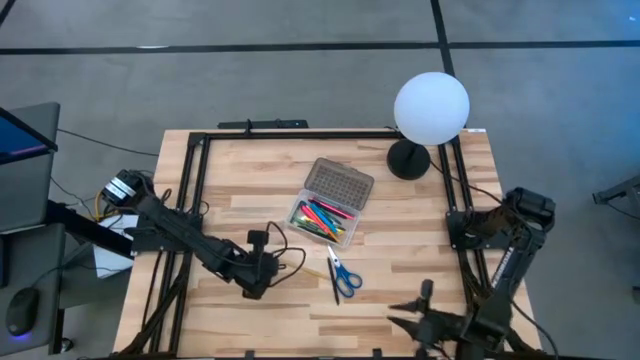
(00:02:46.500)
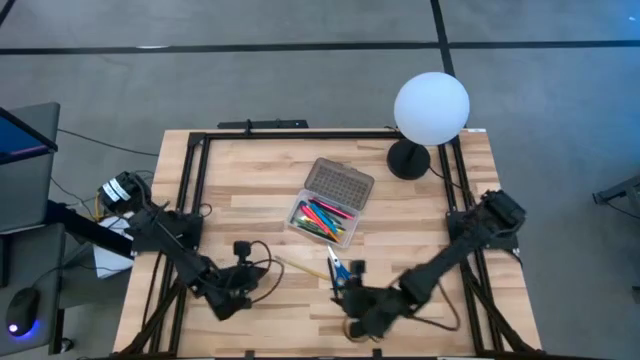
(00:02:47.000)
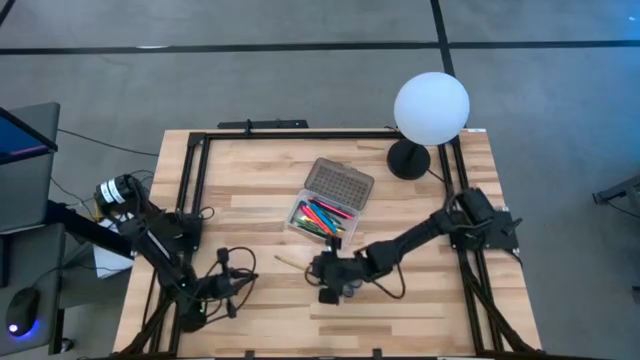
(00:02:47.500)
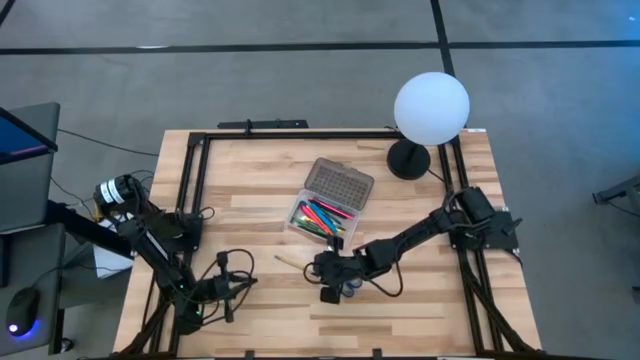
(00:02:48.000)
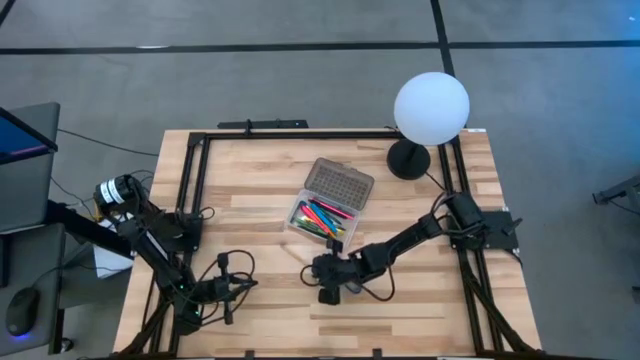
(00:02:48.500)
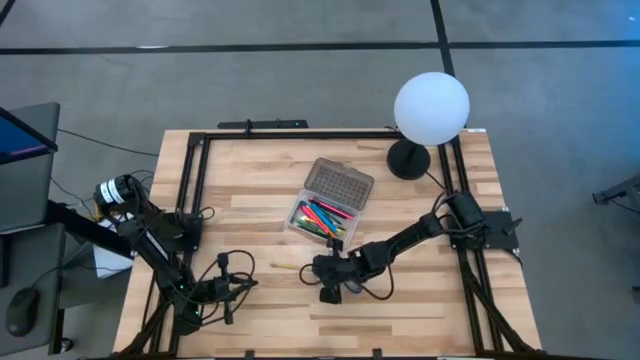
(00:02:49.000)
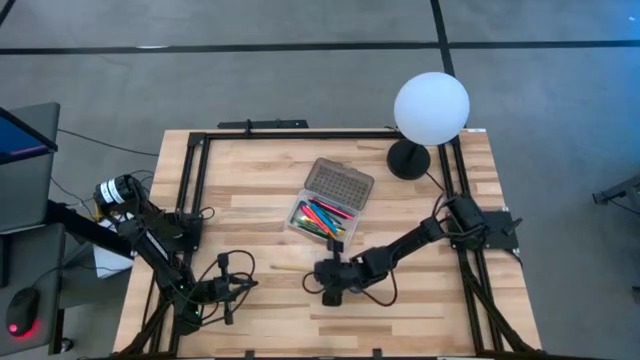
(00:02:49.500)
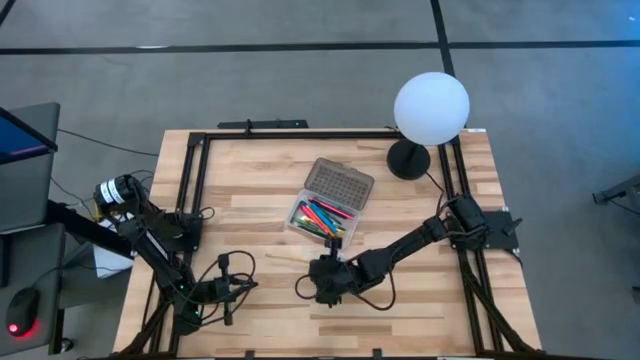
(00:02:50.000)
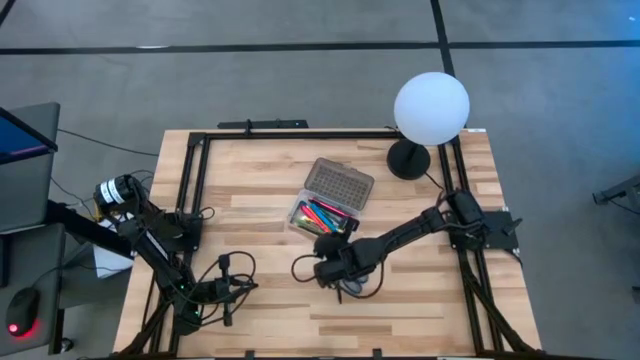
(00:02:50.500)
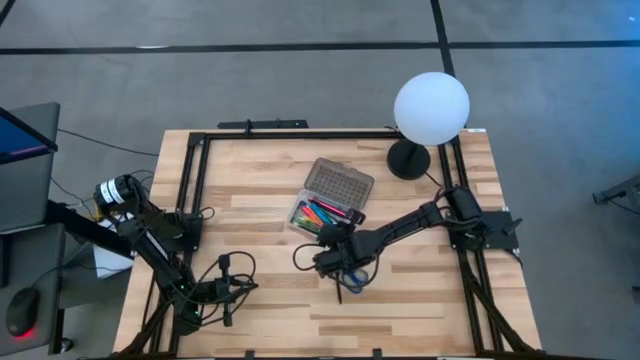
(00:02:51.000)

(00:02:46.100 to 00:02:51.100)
Task: Pick & place school supplies into a supply box
Put the orange pencil into the gray supply box

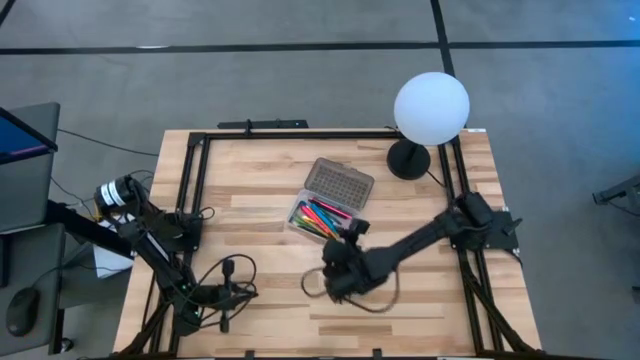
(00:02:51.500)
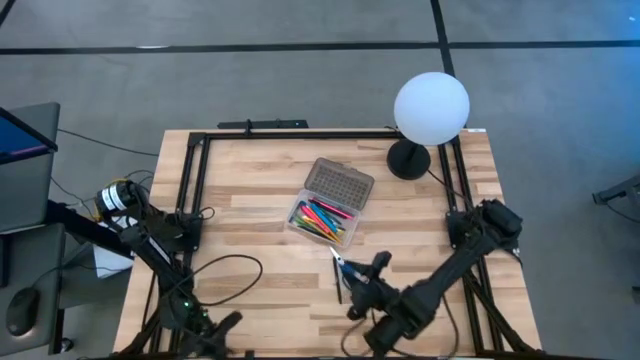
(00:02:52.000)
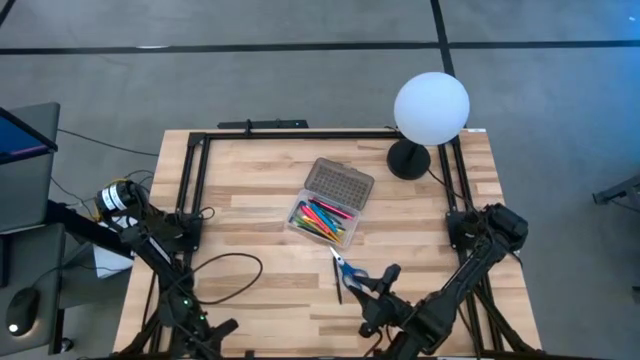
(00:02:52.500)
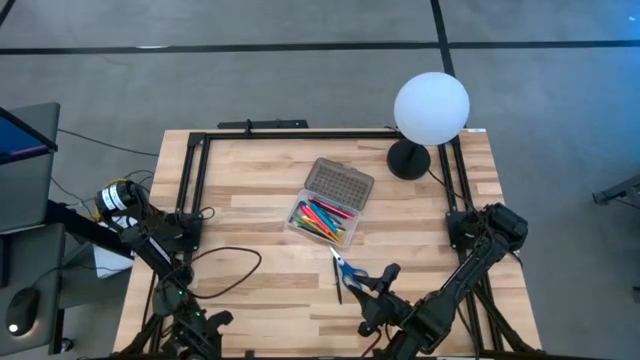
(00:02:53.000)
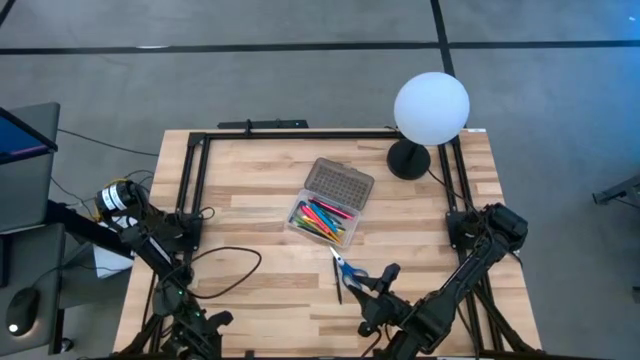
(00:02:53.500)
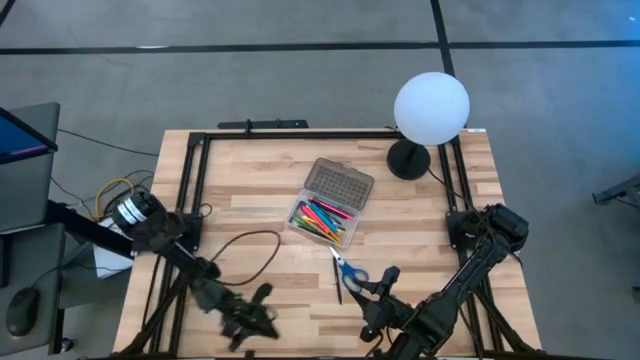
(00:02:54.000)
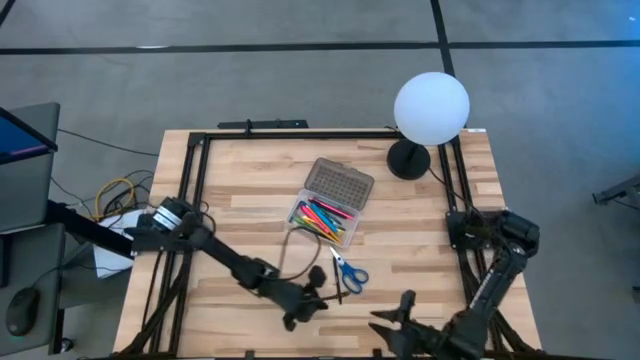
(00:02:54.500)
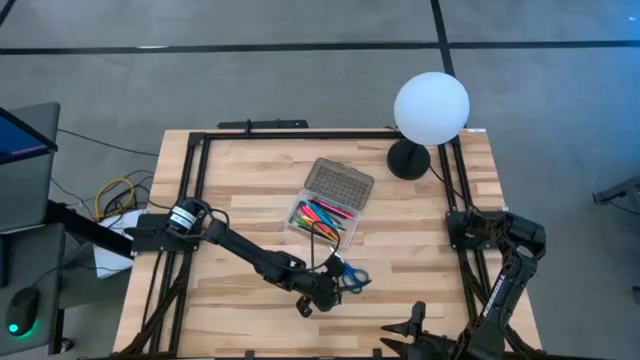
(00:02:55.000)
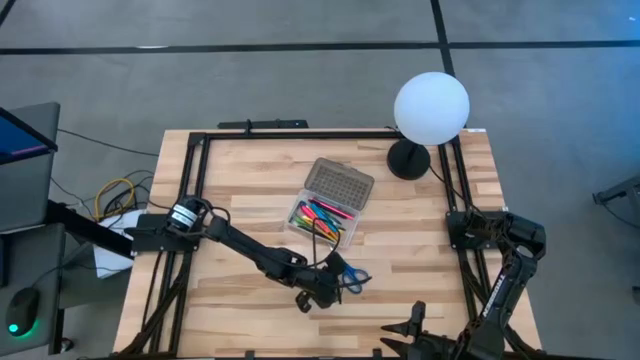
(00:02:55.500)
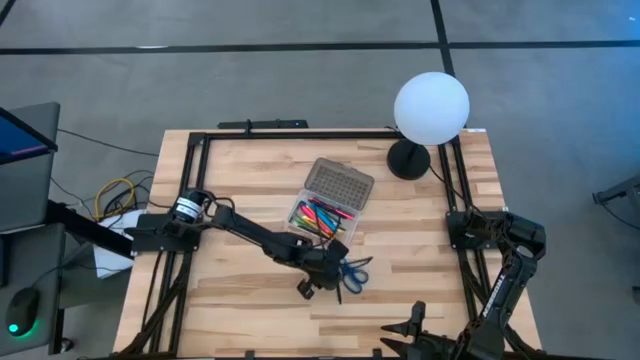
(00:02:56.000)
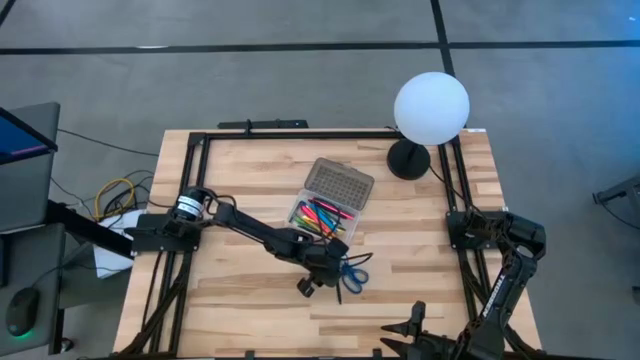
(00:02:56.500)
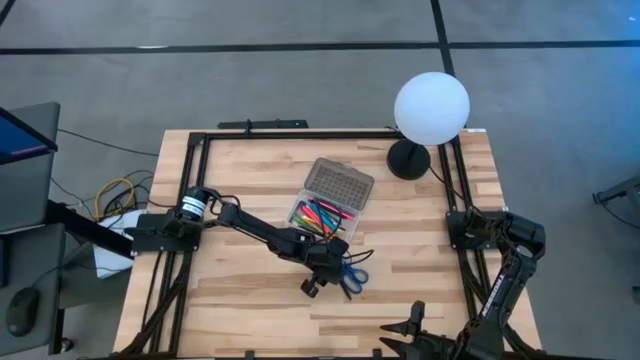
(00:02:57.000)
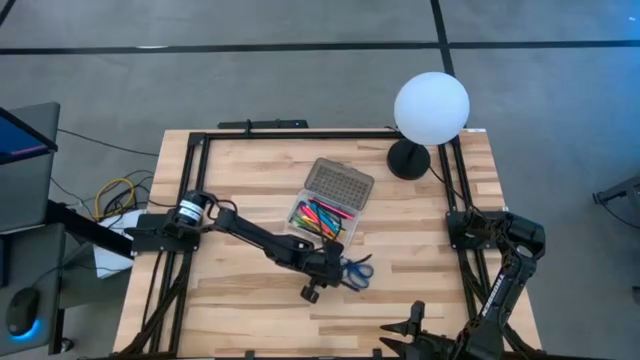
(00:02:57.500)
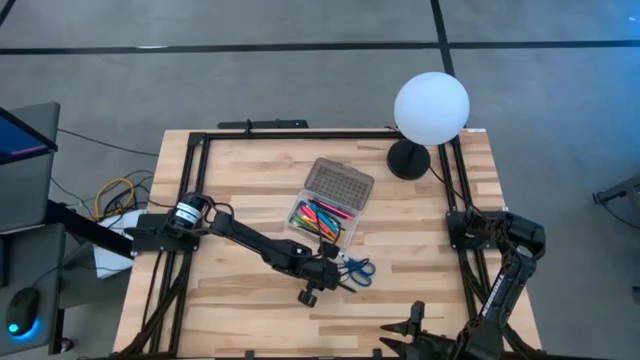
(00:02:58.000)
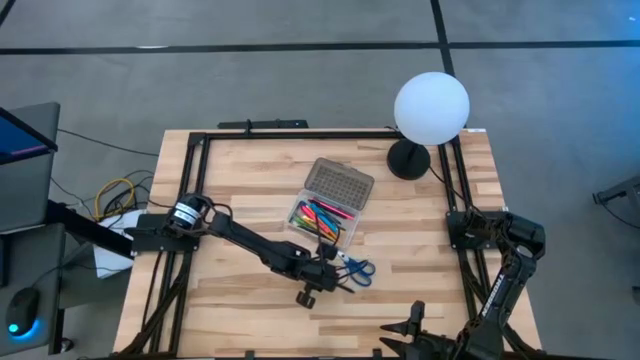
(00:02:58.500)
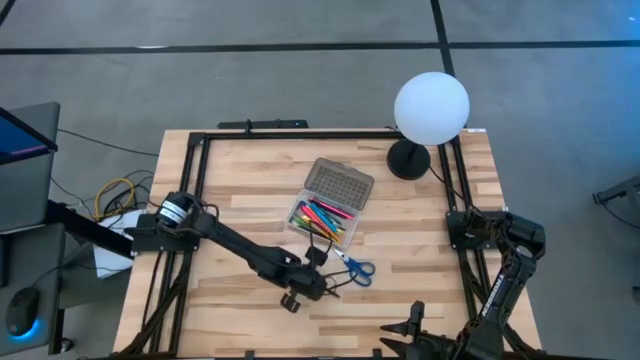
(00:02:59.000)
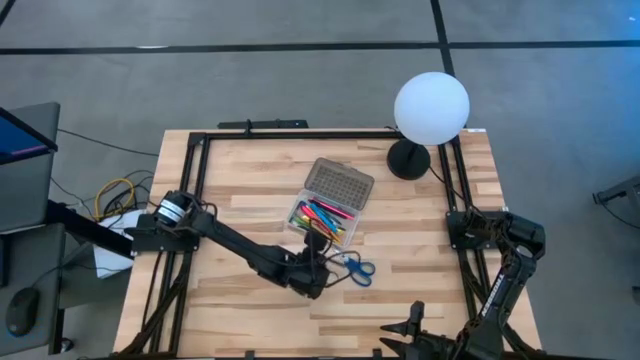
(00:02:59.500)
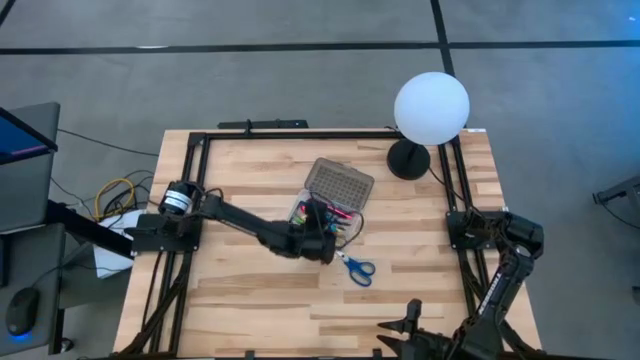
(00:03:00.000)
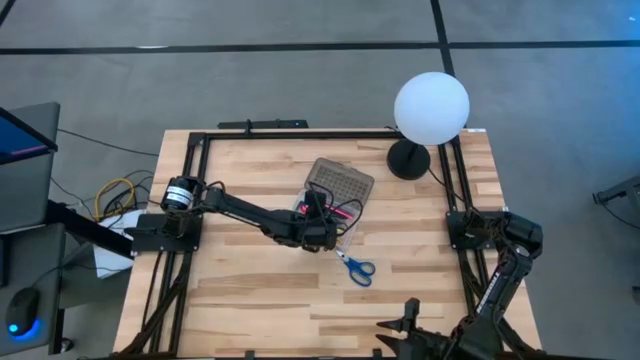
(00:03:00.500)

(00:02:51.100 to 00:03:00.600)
Put the black pen into the gray supply box

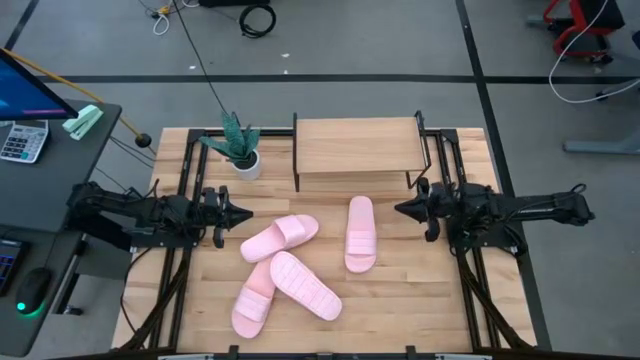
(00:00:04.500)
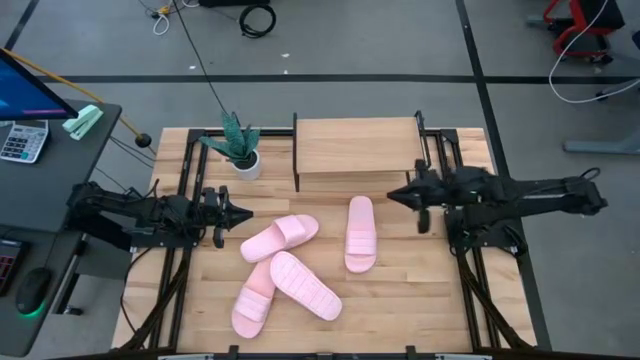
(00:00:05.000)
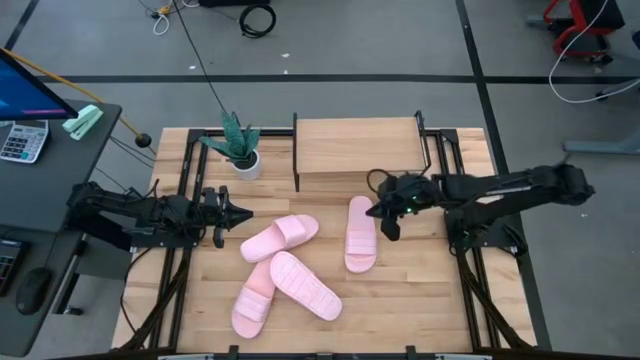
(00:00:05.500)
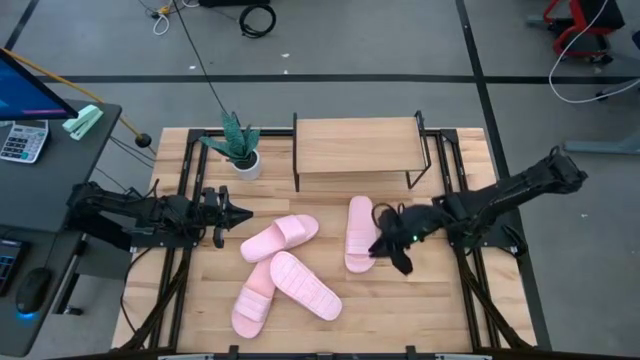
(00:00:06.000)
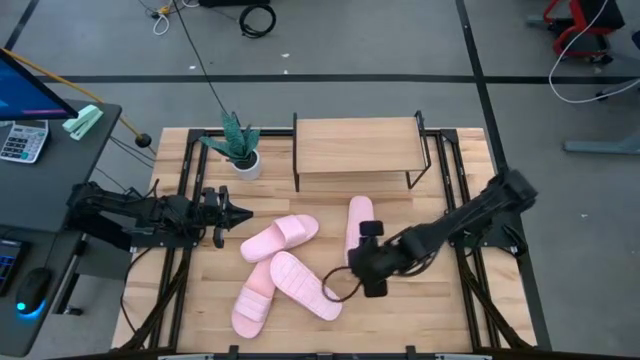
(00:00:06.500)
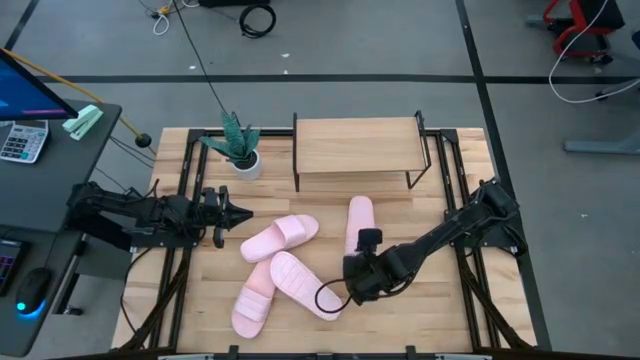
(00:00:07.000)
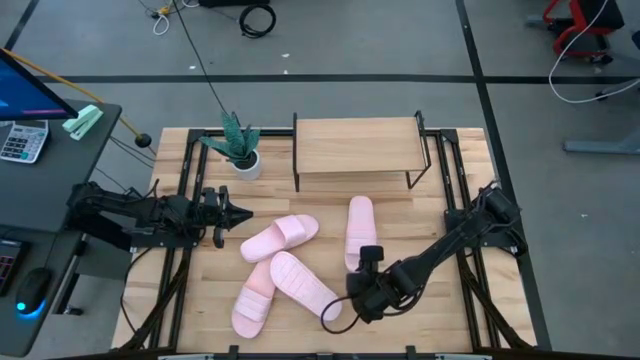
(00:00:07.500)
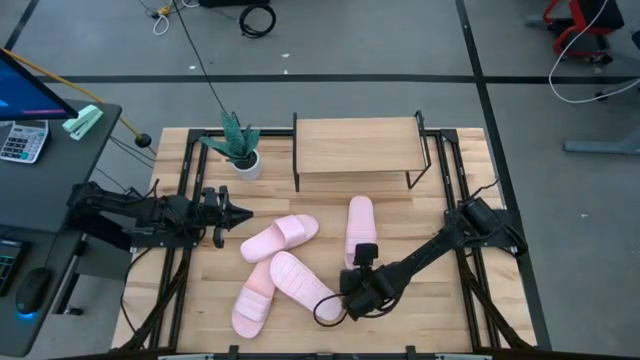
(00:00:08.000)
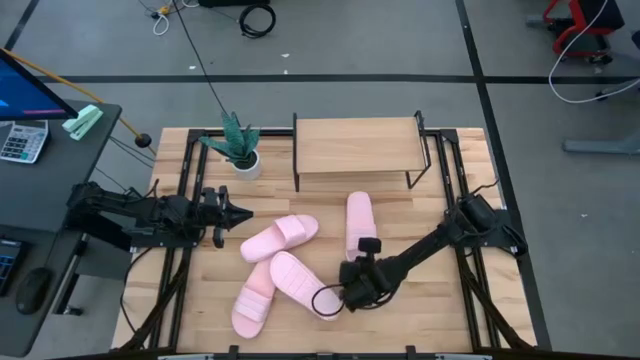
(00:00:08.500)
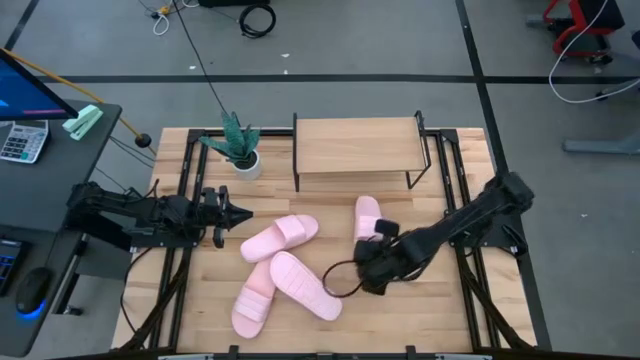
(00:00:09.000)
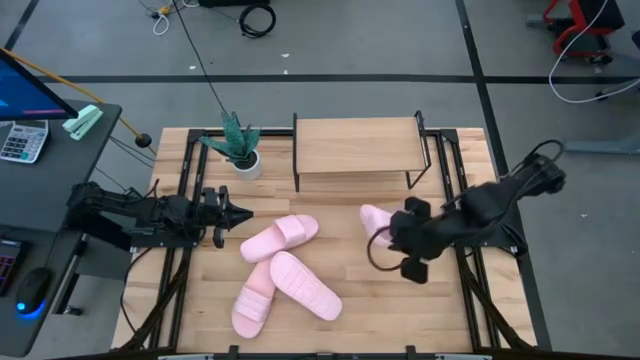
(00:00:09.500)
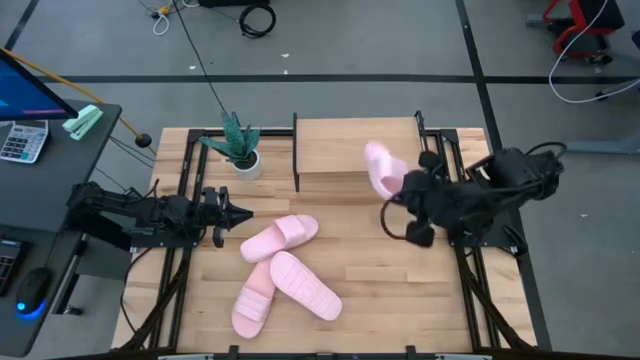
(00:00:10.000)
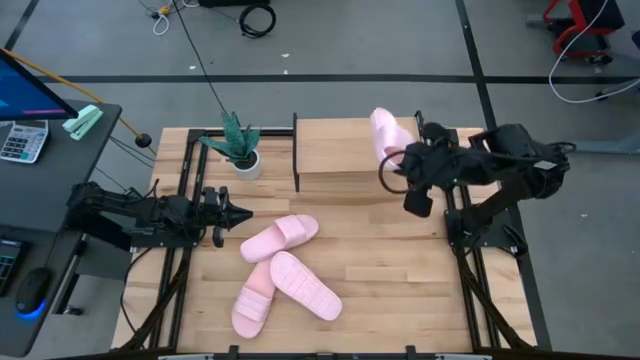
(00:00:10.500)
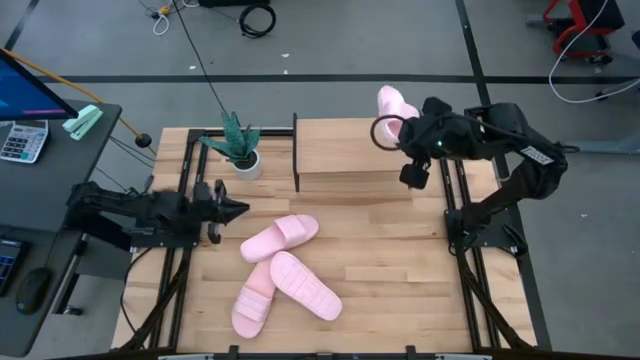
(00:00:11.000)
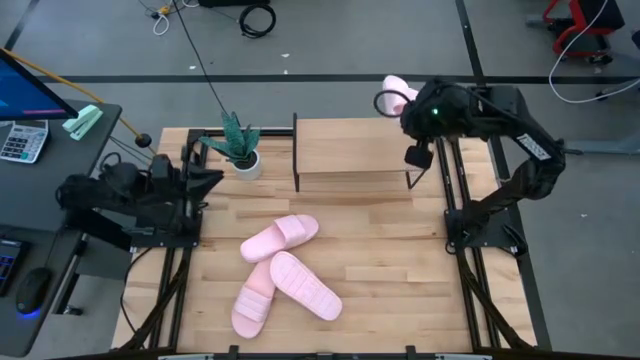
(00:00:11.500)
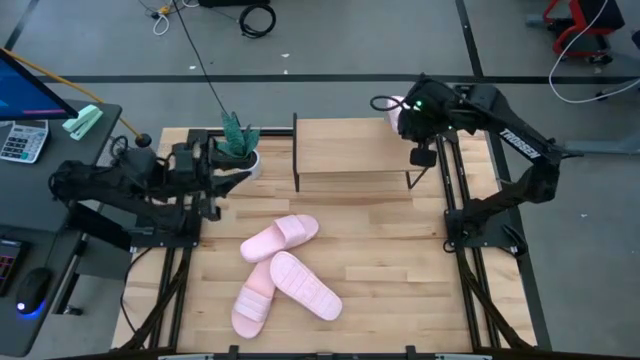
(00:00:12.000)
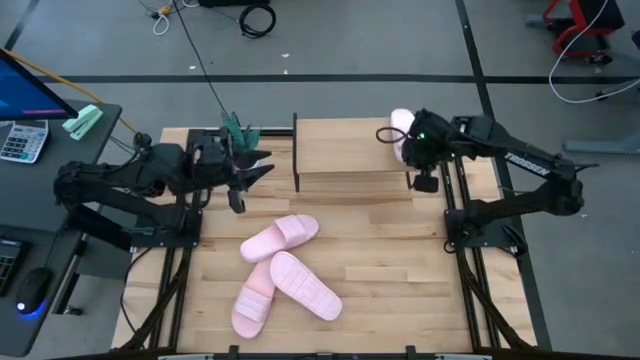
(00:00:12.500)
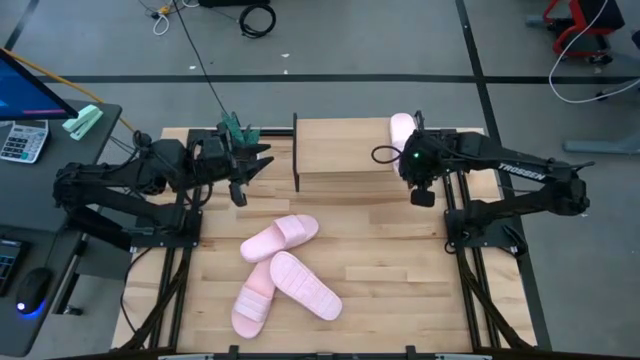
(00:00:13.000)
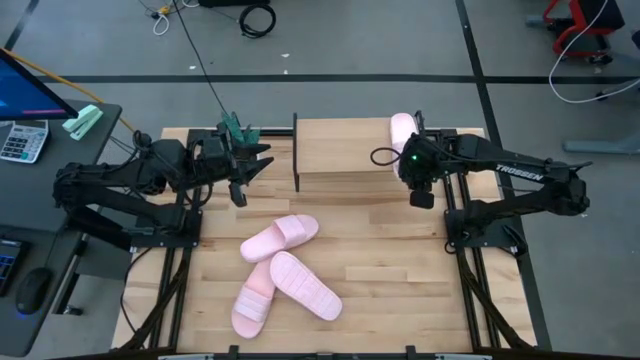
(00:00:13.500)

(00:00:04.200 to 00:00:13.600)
Task: Pick and place slides into the shelf
Put the pink slipper on the shelf
